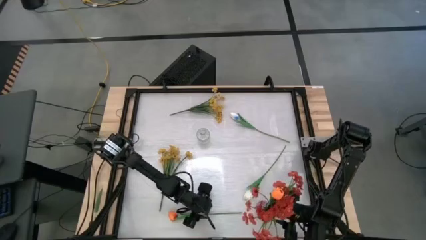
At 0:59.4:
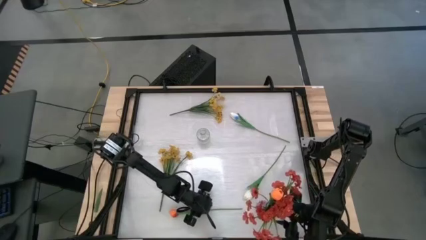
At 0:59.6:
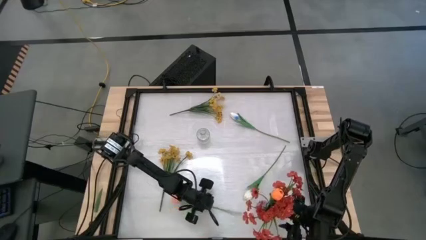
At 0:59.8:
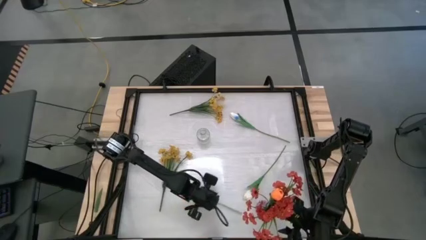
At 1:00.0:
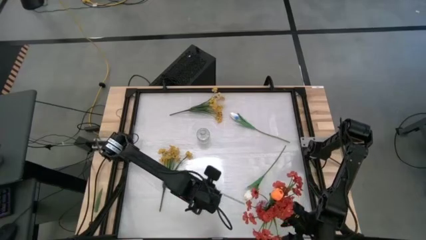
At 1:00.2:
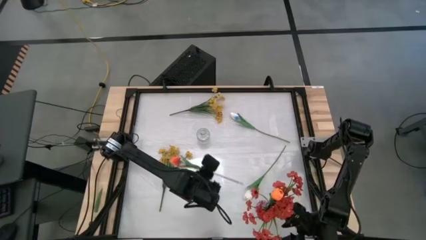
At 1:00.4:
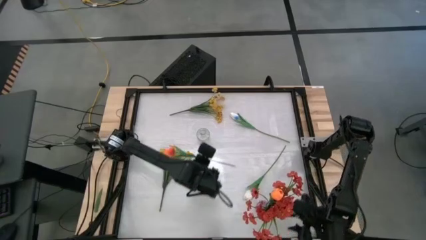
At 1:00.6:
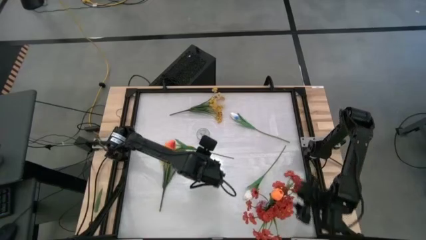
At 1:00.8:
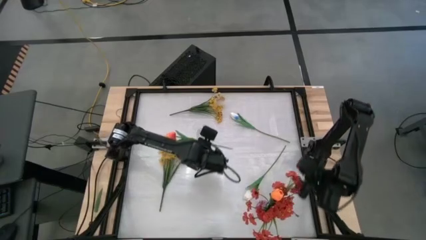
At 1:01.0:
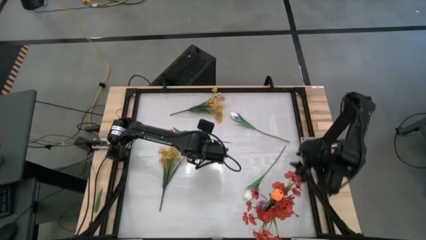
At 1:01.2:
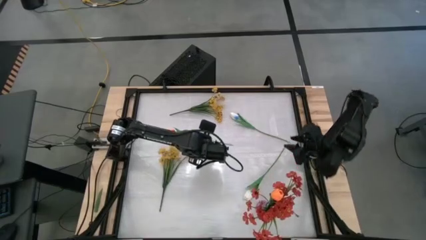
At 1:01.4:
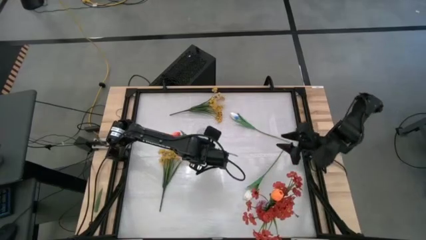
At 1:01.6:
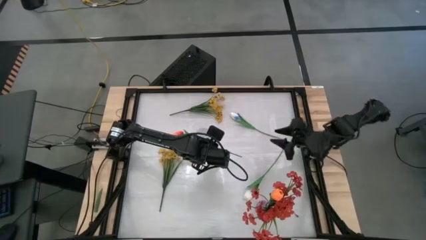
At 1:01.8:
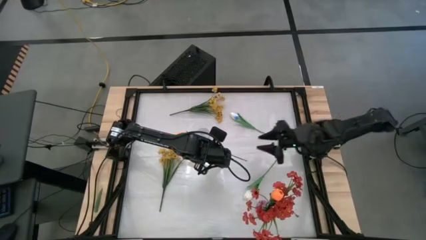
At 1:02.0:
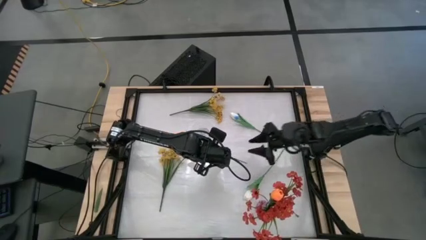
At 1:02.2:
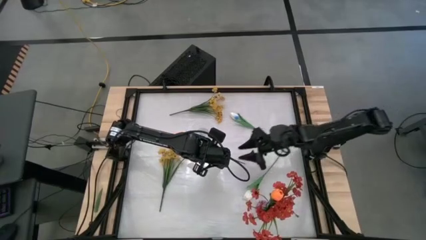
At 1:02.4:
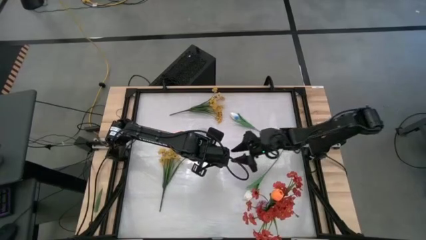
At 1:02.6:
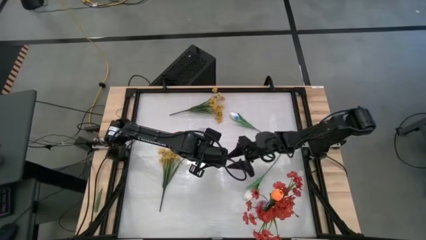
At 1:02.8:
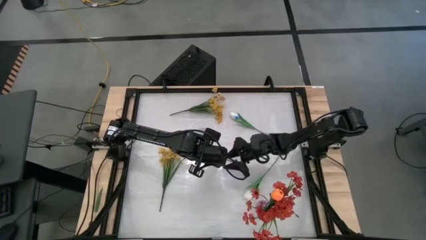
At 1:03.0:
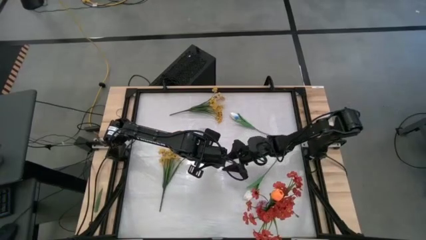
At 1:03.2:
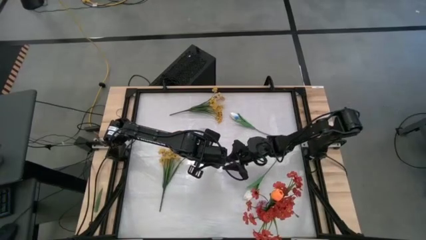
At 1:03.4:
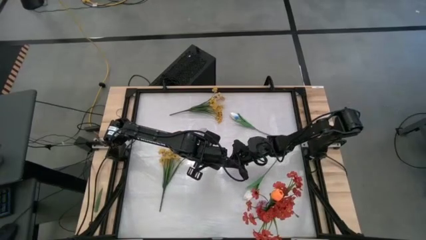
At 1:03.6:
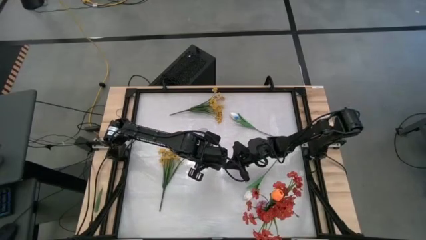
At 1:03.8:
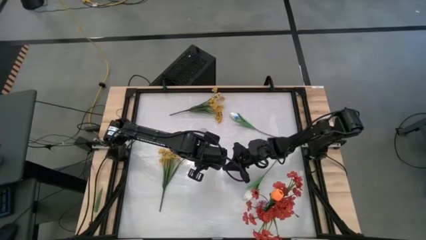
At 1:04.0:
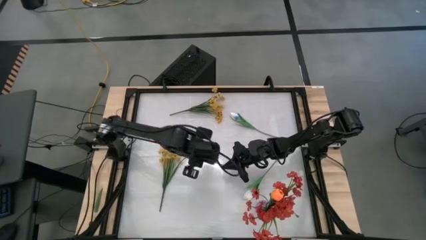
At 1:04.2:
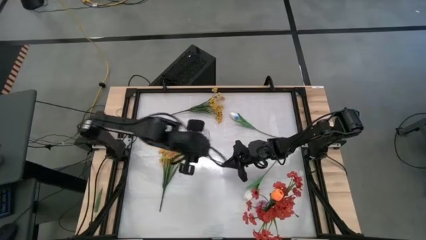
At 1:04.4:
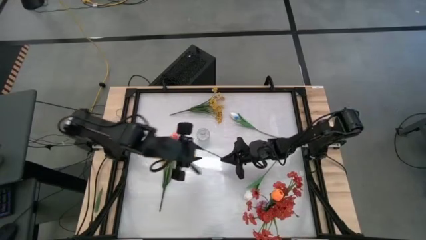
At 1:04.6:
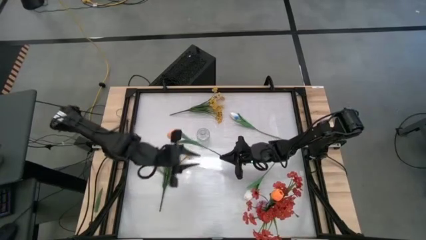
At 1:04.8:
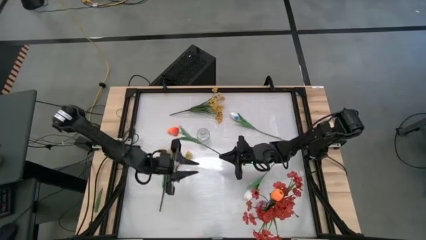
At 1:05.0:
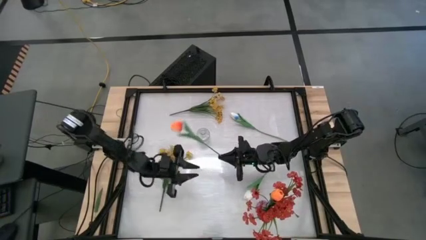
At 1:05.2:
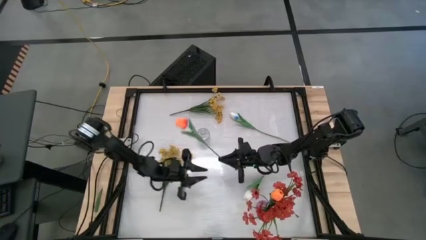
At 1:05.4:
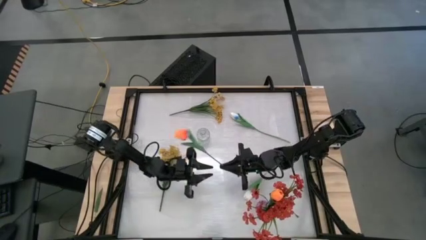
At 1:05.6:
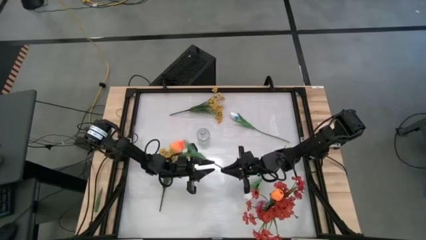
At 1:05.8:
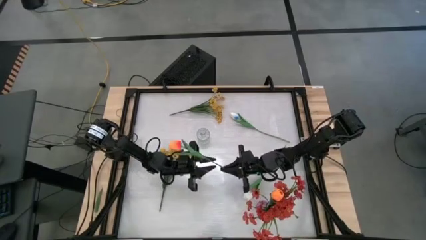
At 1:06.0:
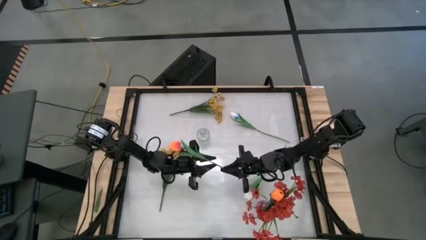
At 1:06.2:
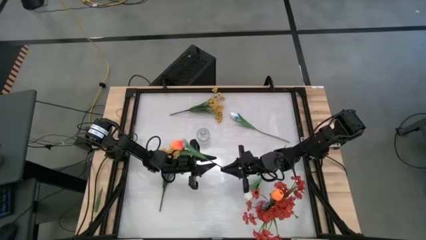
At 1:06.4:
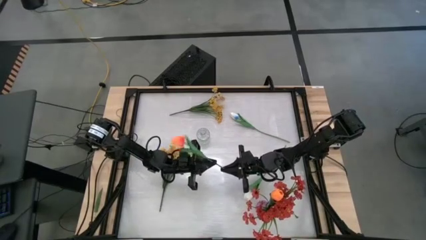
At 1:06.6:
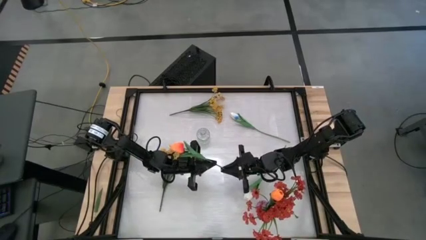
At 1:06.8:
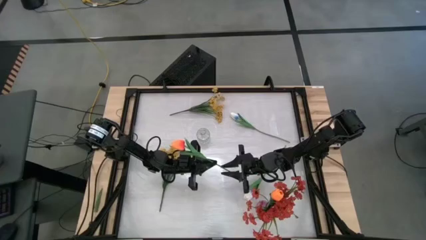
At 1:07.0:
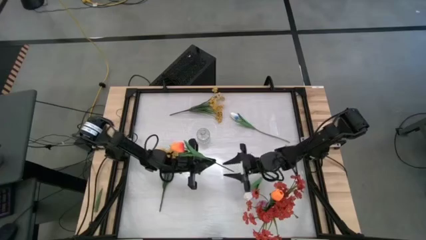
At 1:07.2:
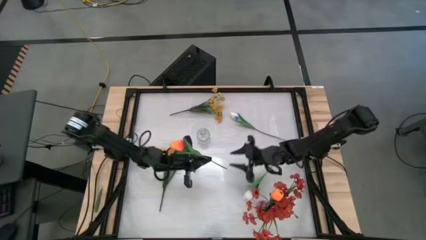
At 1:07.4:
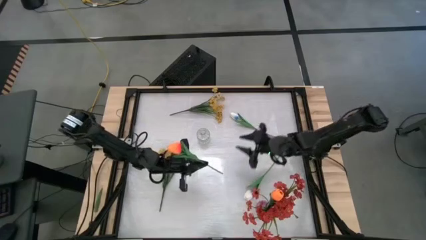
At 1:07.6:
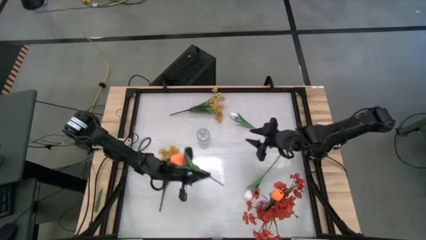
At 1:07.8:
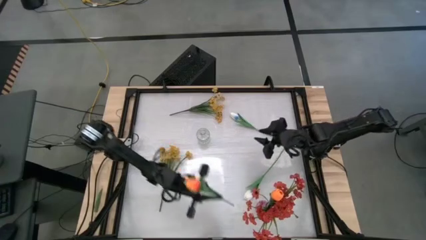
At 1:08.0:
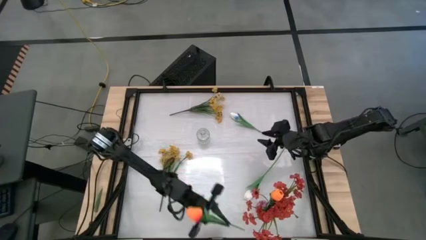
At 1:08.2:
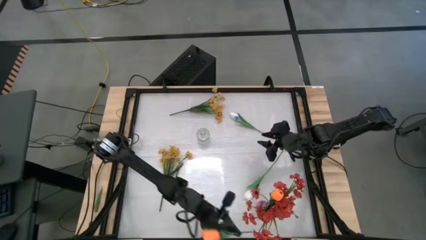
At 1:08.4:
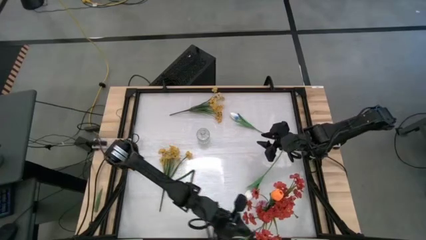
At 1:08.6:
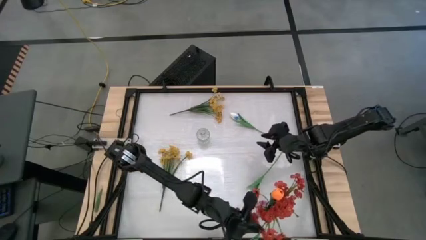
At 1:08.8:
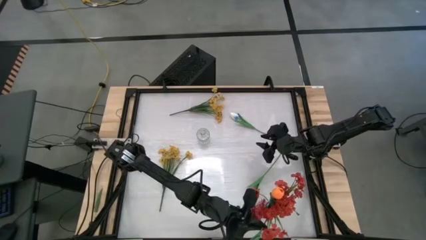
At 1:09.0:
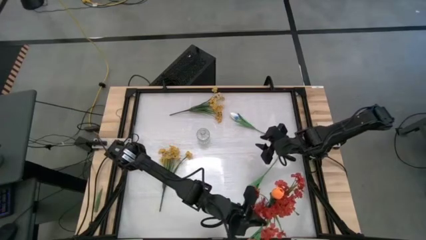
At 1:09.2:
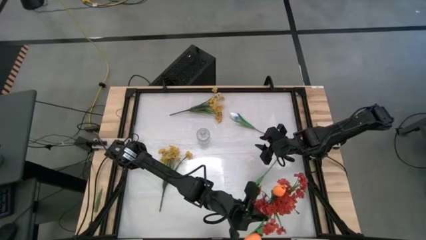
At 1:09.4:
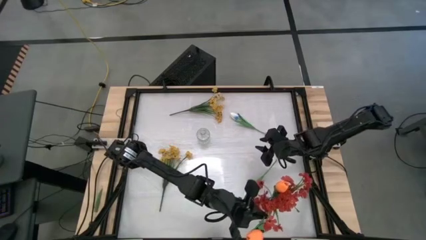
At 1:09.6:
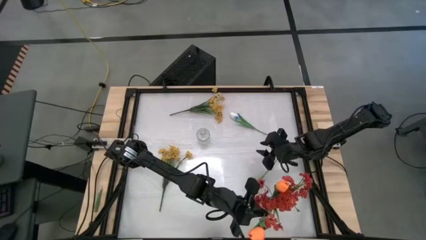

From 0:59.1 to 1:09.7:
Task: Sort flowers into vase by color
Put the orange flower into the pink vase
